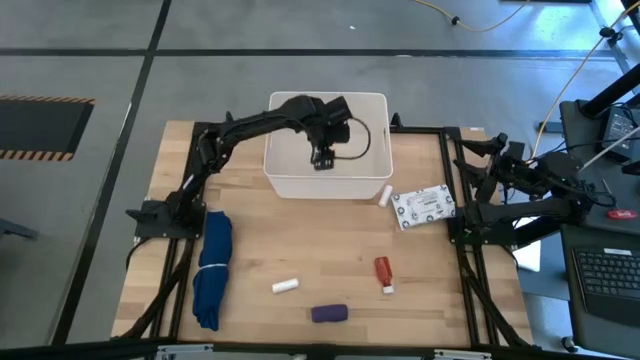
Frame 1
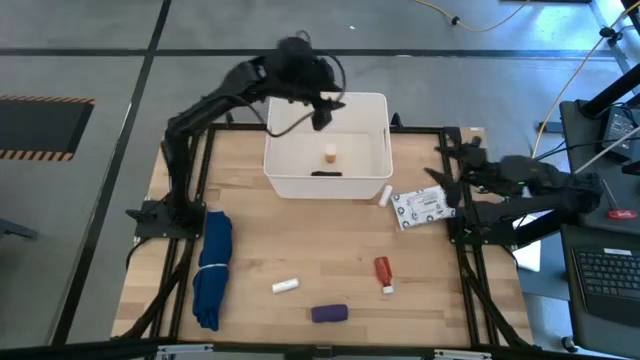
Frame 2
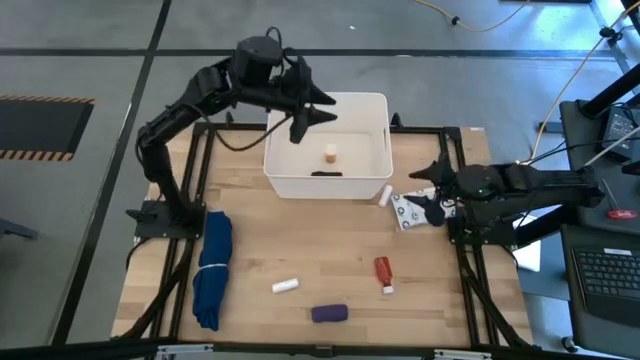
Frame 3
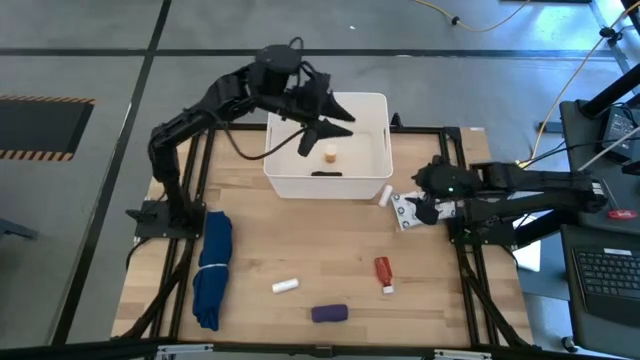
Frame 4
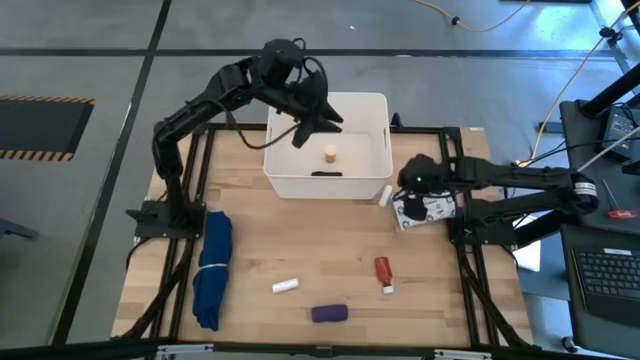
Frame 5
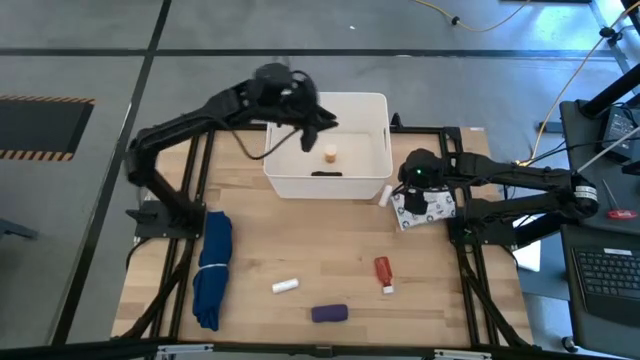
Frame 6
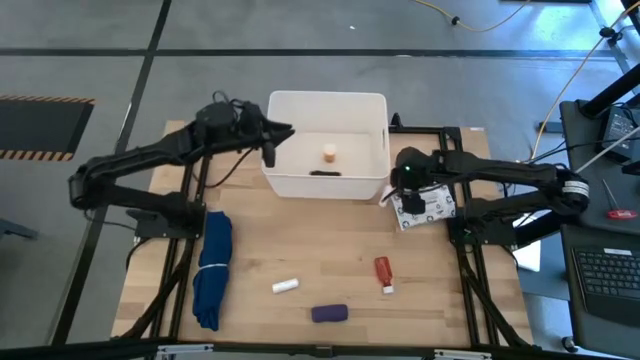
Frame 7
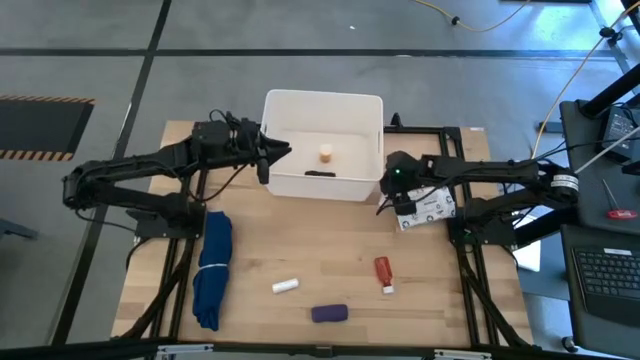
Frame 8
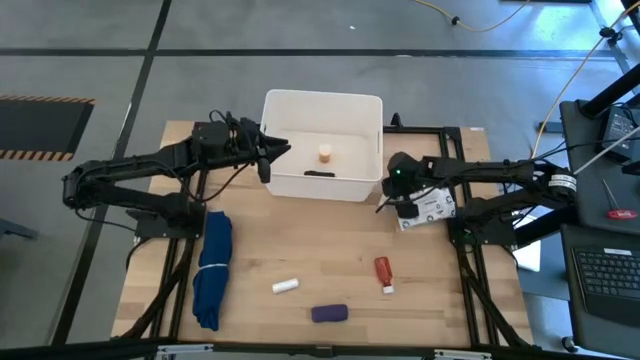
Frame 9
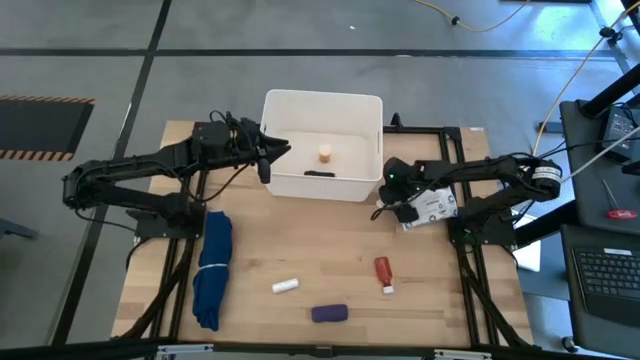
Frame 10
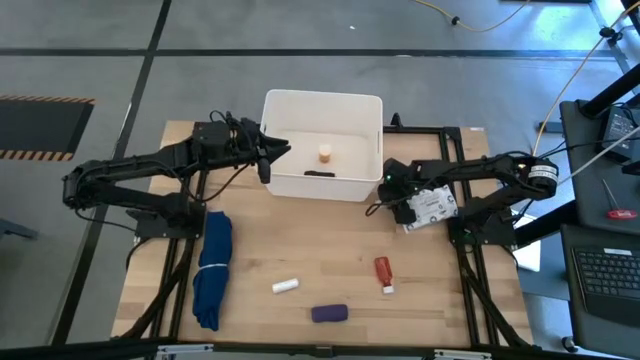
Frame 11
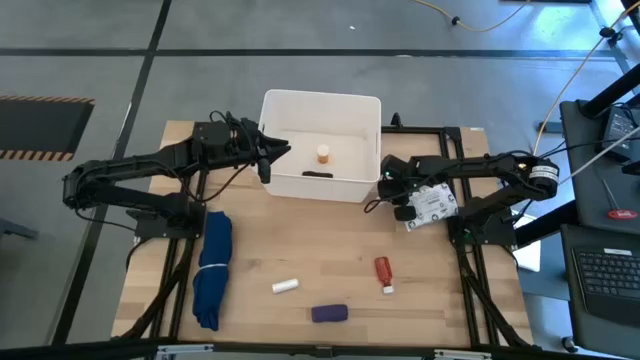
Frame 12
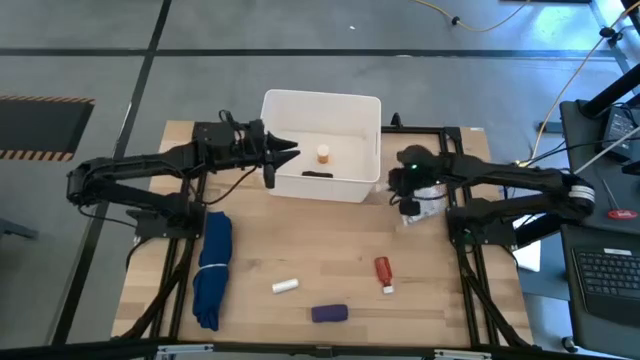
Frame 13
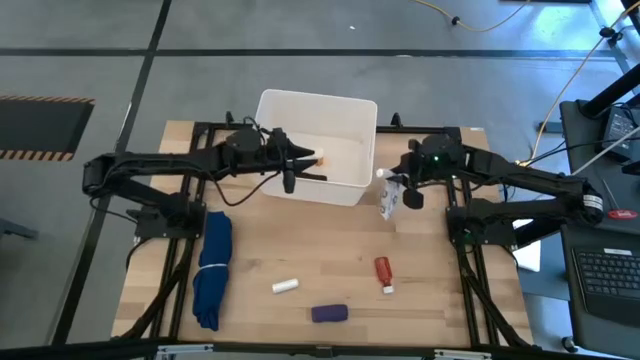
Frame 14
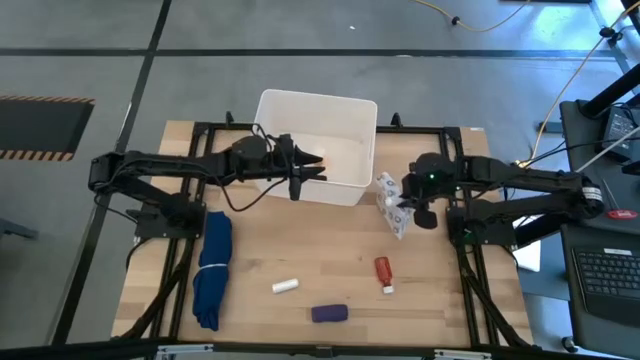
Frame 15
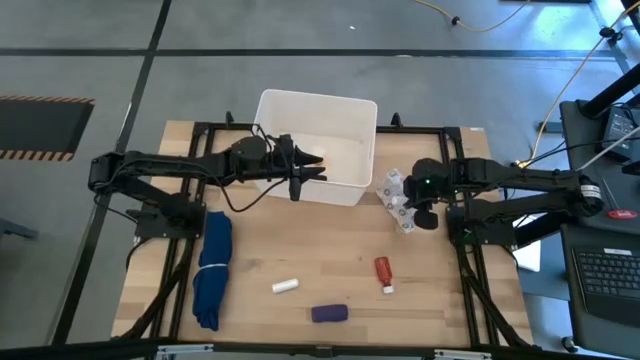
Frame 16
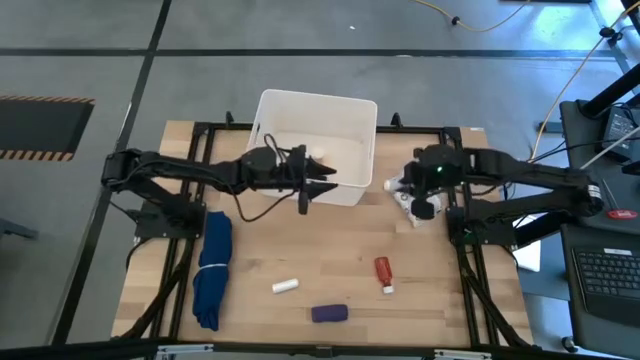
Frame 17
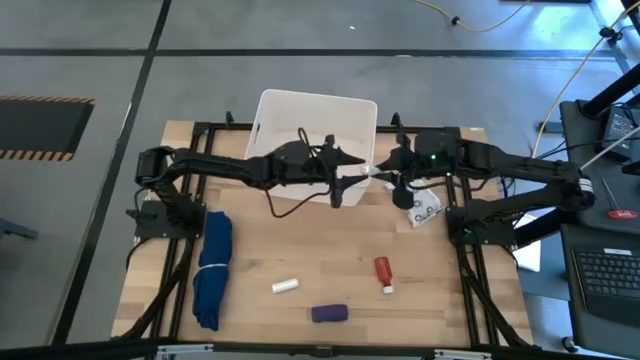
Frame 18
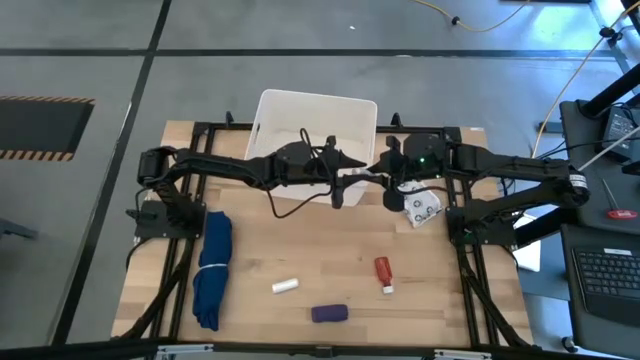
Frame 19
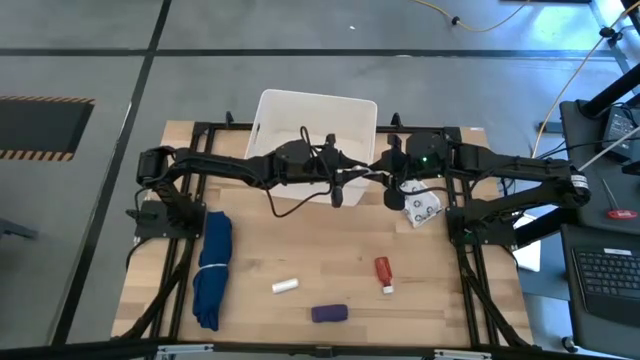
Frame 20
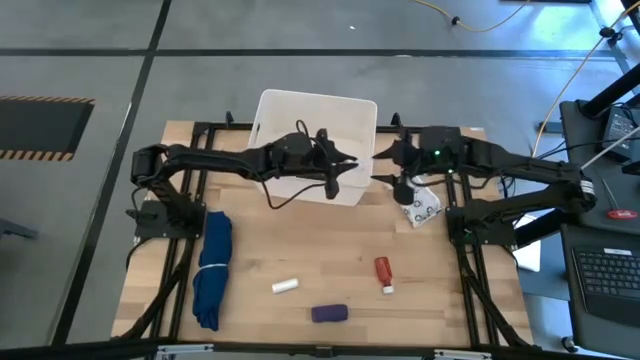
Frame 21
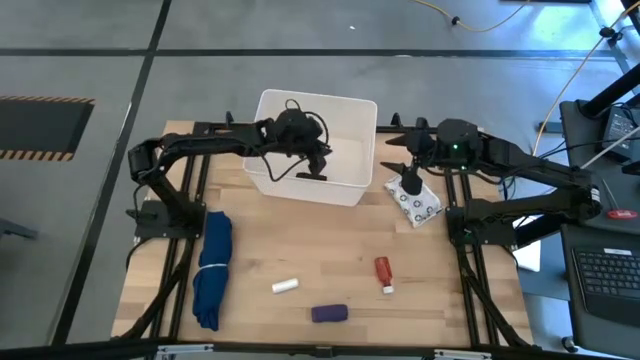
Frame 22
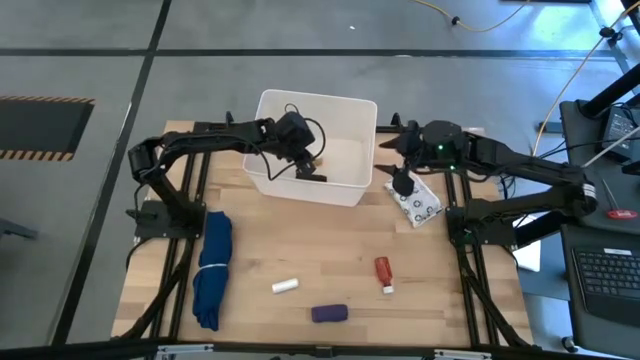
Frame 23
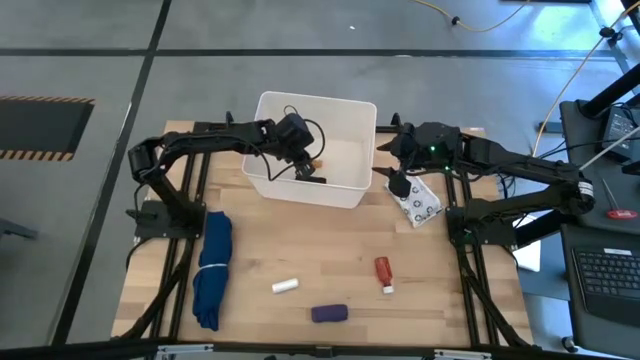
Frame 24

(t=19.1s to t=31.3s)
Task: Pick & place medical supplies in basket/bin
Put the top white rolled gauze into the white bin

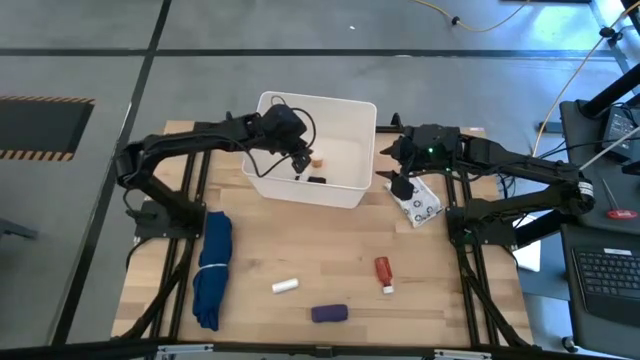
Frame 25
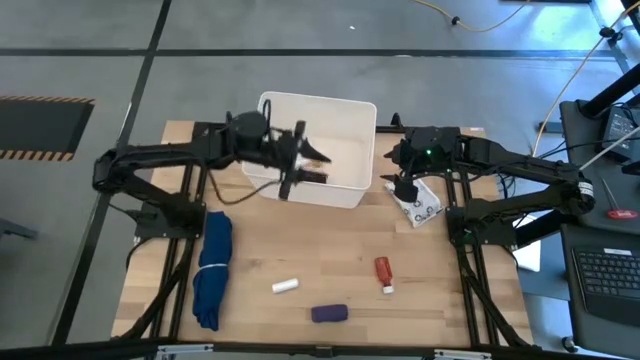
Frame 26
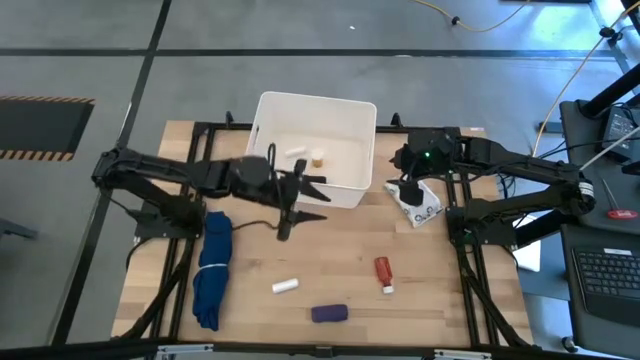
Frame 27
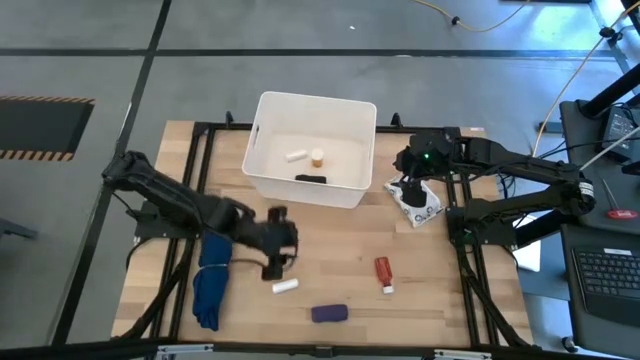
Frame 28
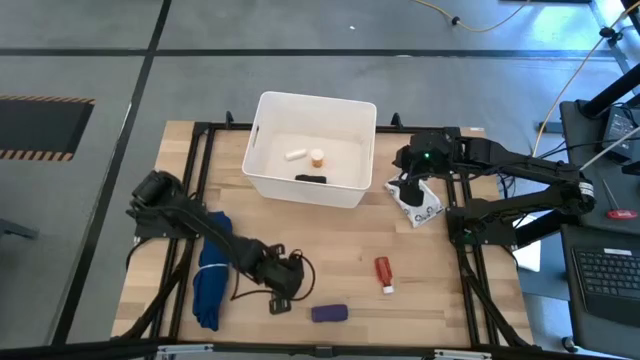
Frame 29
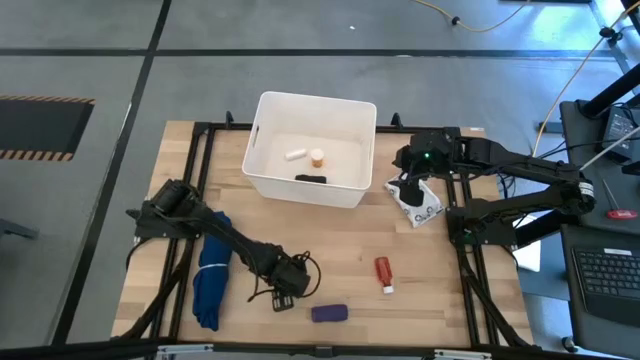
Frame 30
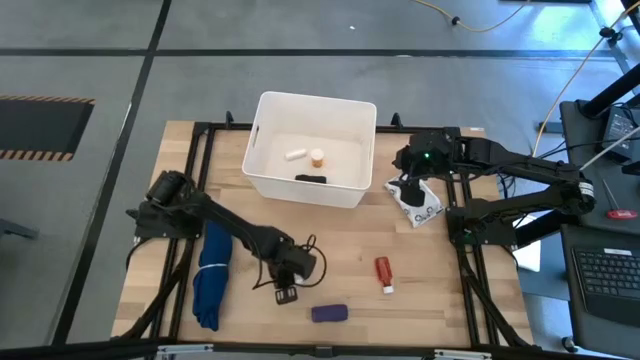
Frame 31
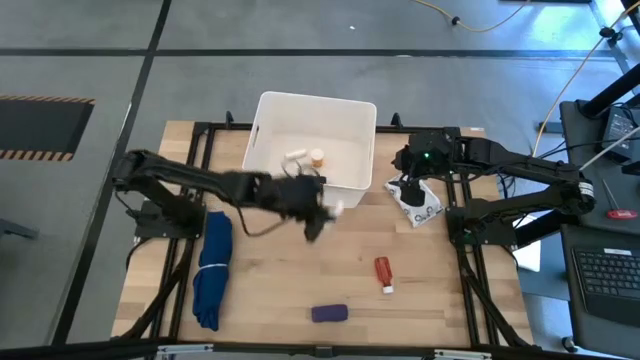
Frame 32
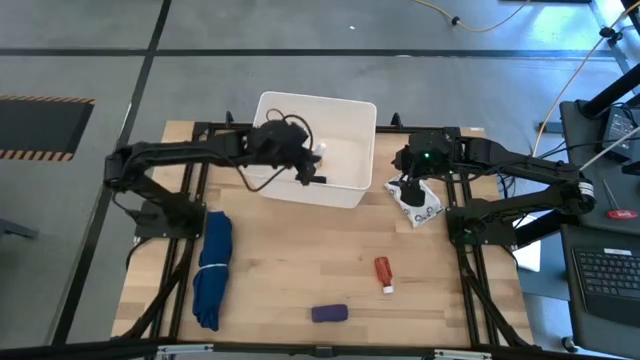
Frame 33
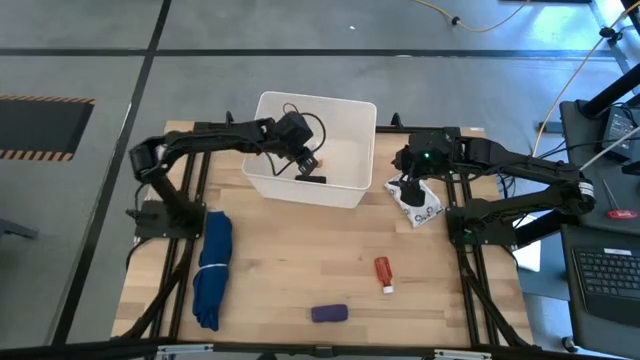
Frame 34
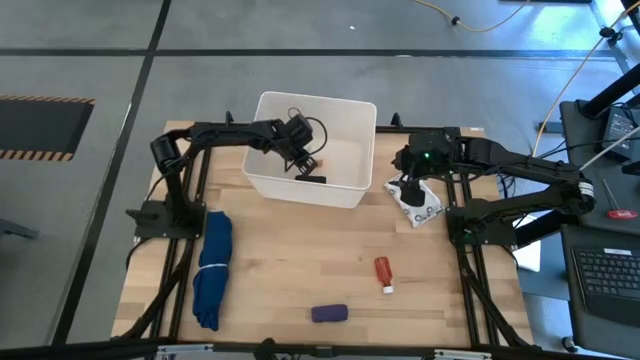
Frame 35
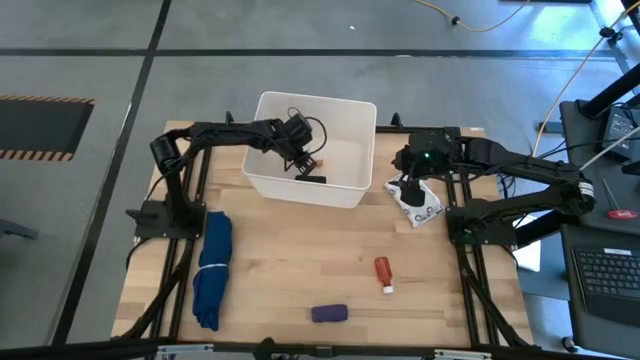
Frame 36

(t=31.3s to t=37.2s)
Put the white rolled gauze into the white bin

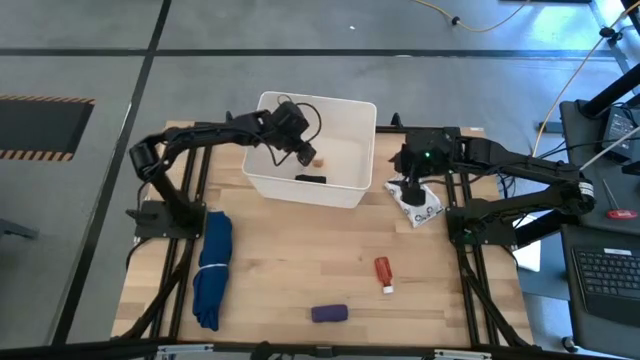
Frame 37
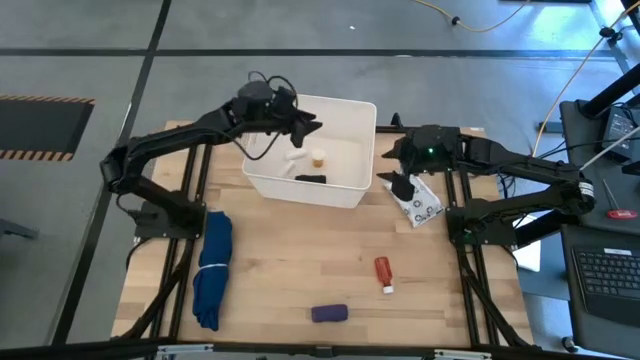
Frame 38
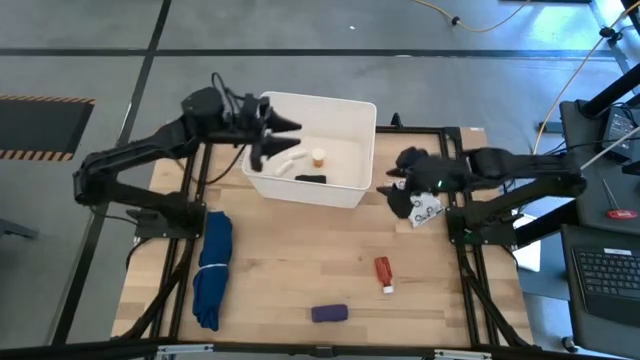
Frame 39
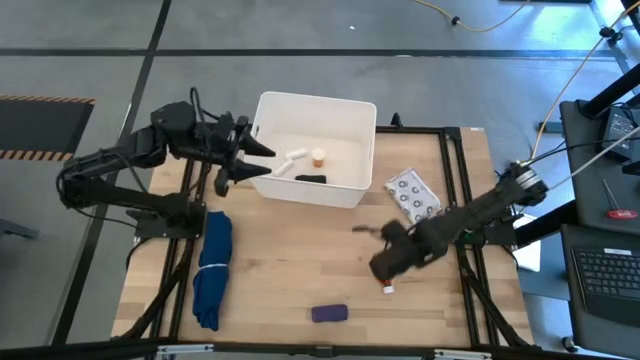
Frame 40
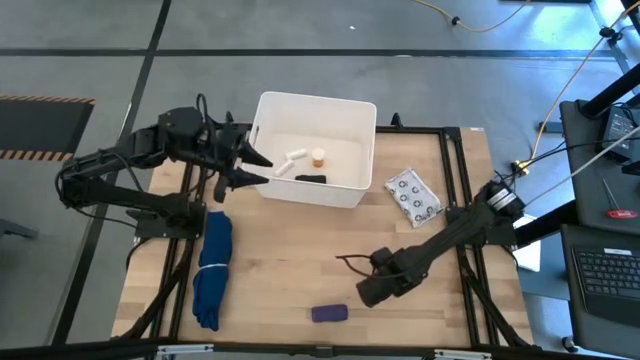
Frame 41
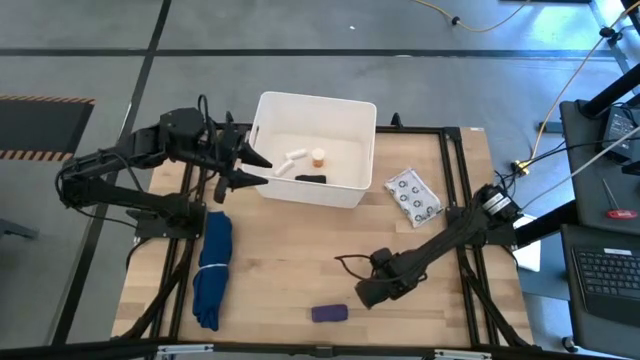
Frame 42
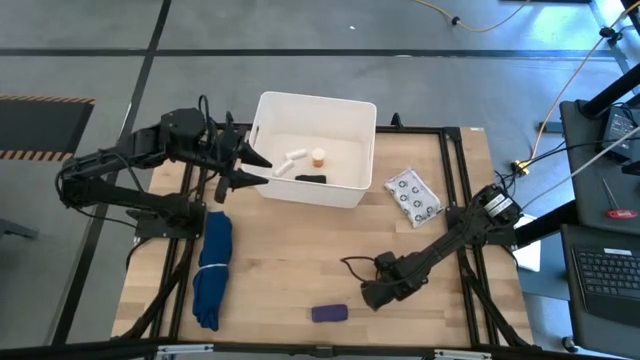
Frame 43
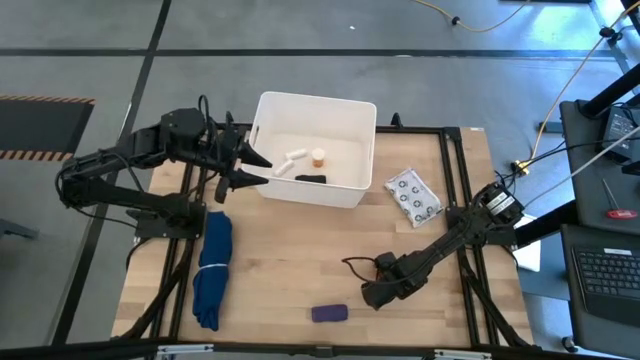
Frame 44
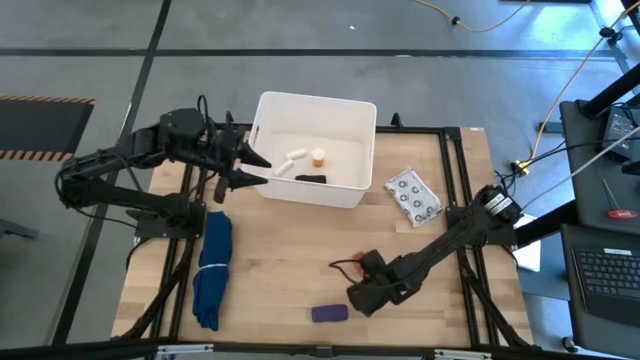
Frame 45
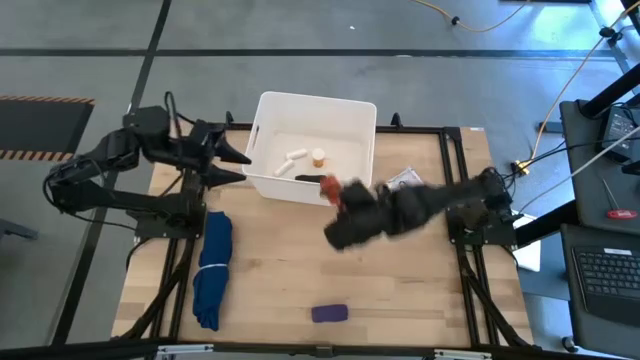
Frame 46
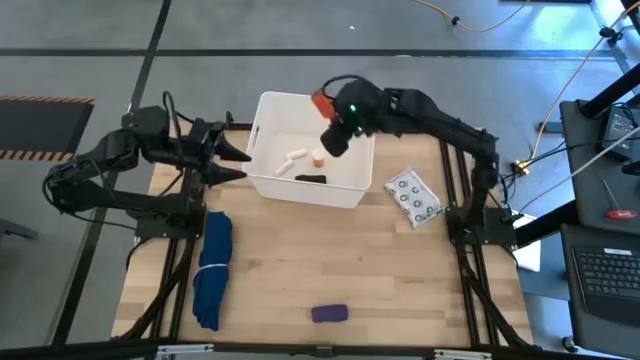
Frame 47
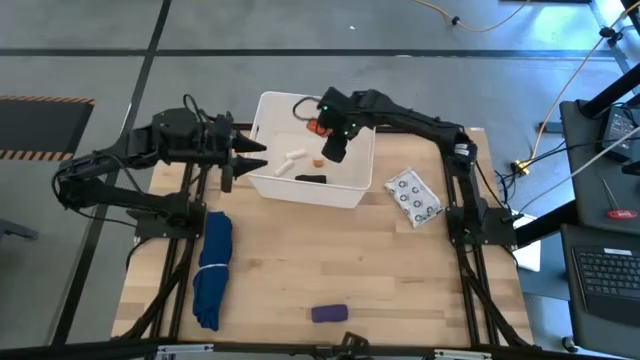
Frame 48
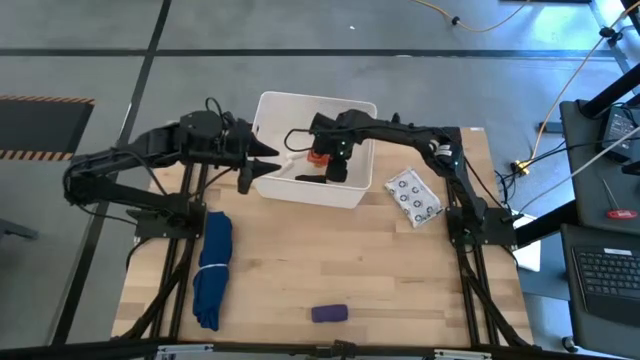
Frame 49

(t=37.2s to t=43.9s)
Put the orange medicine bottle into the white bin
